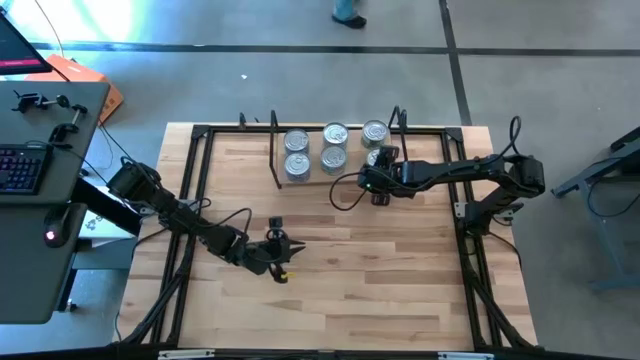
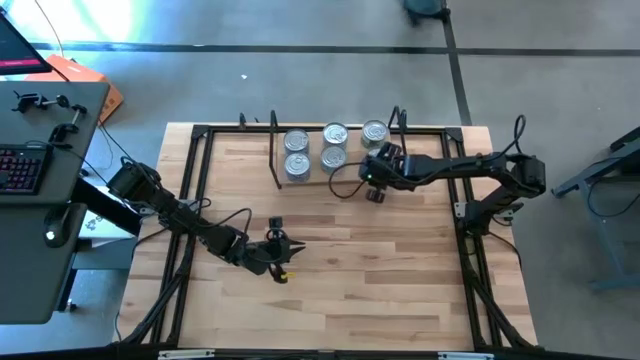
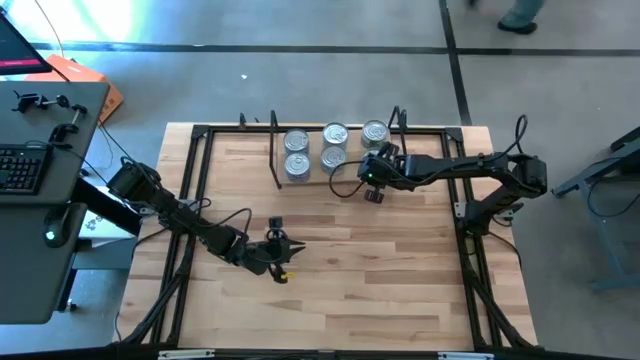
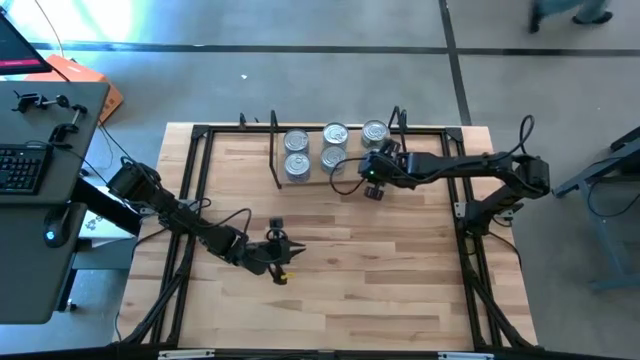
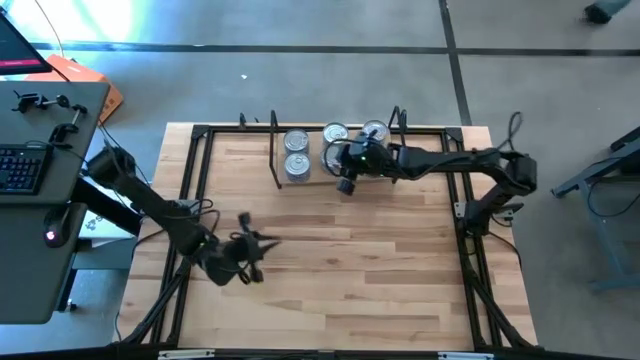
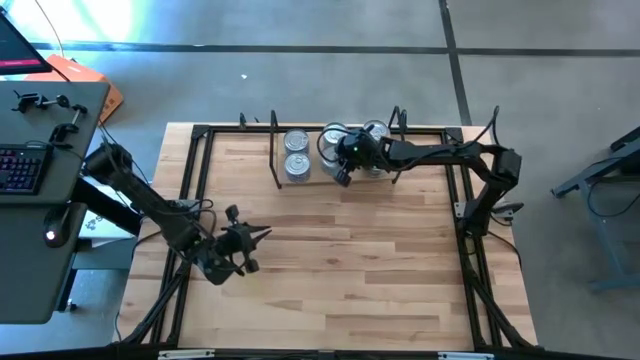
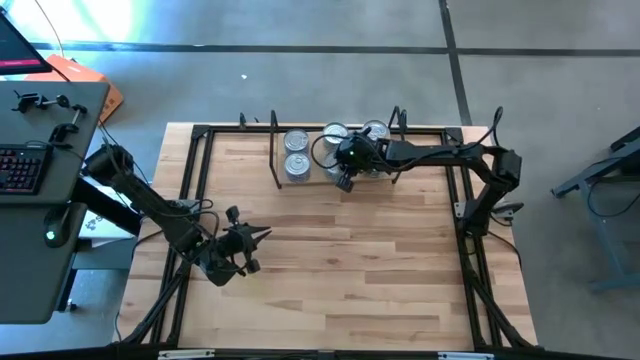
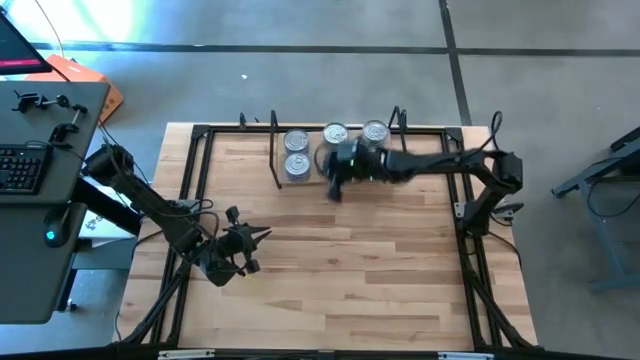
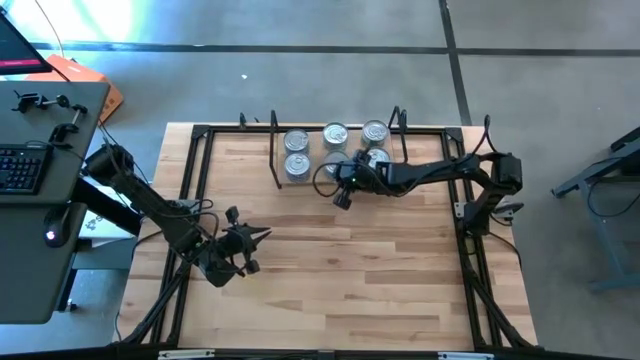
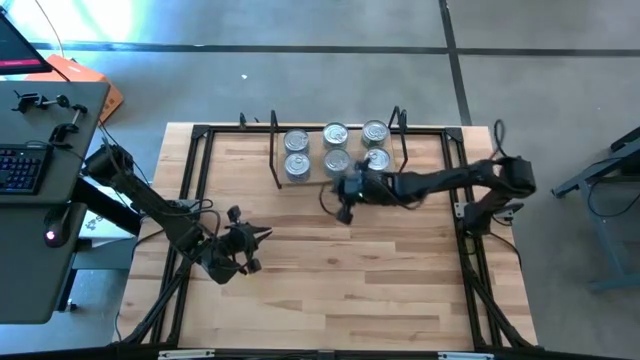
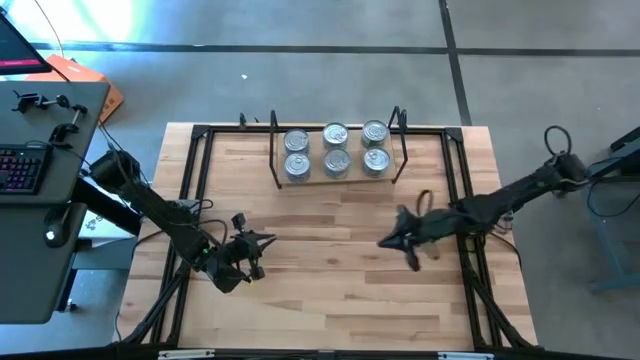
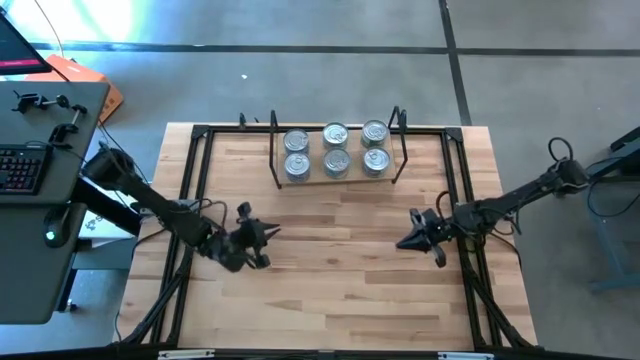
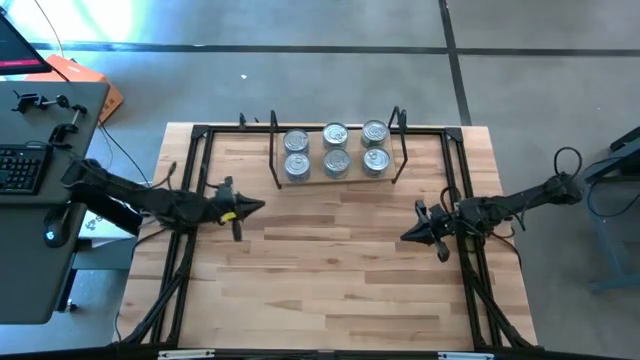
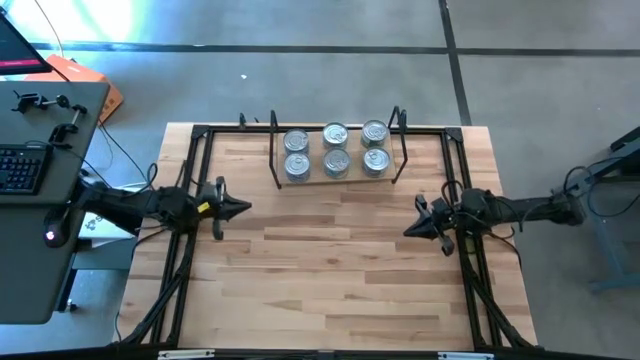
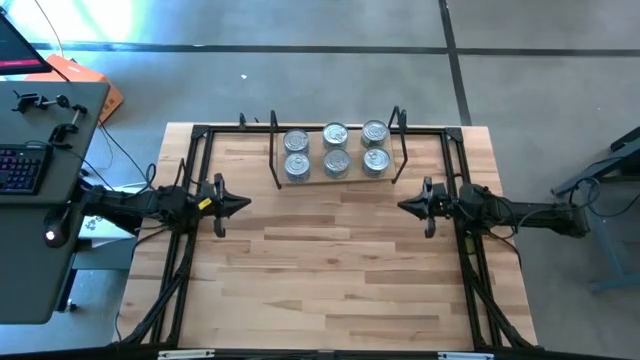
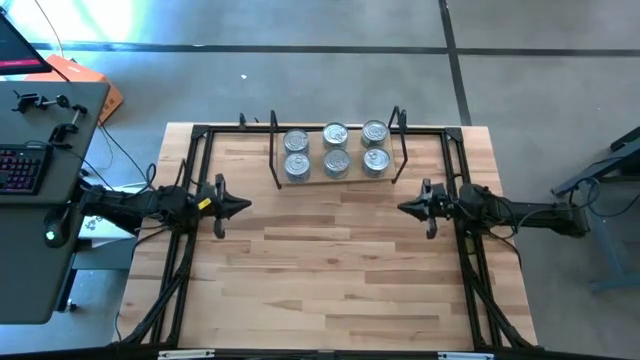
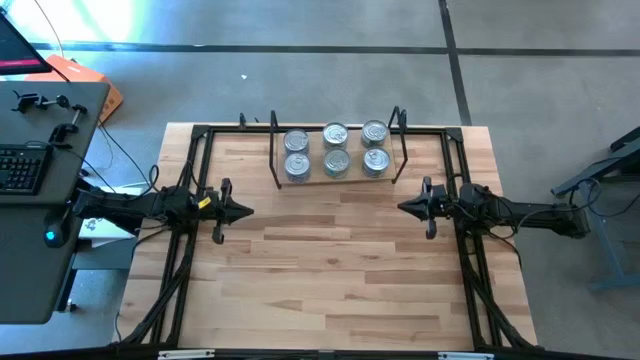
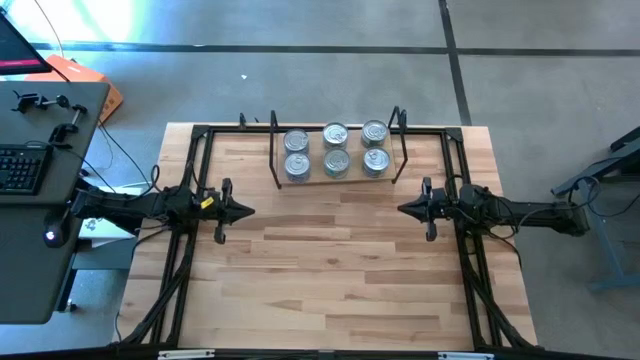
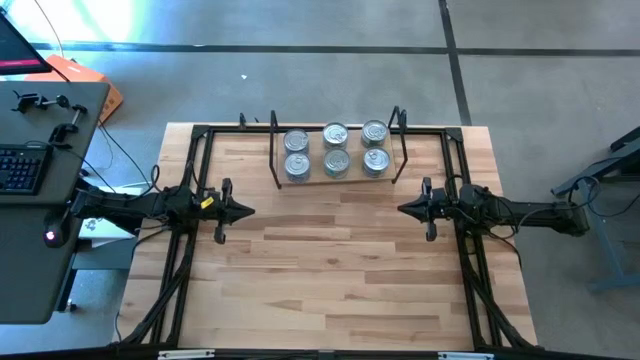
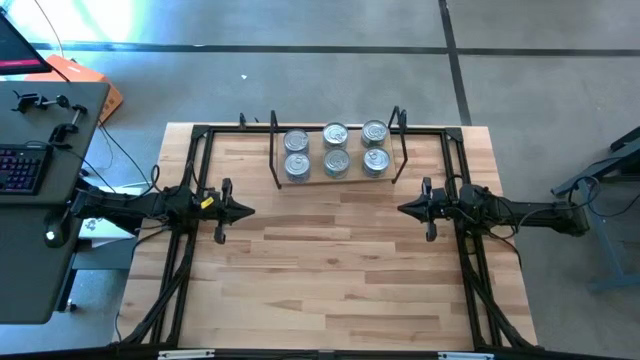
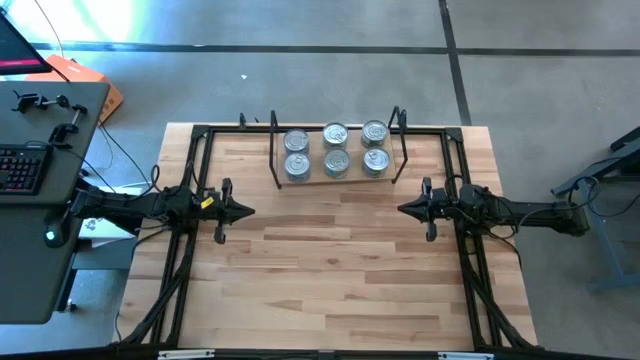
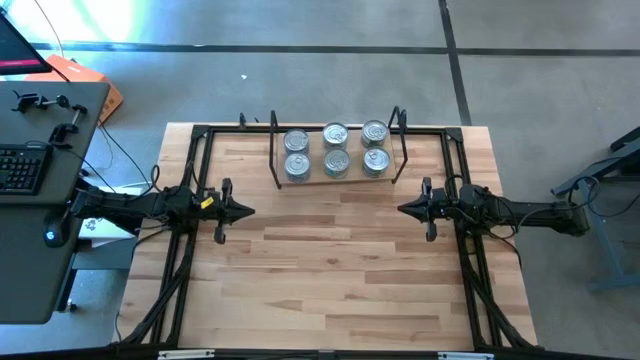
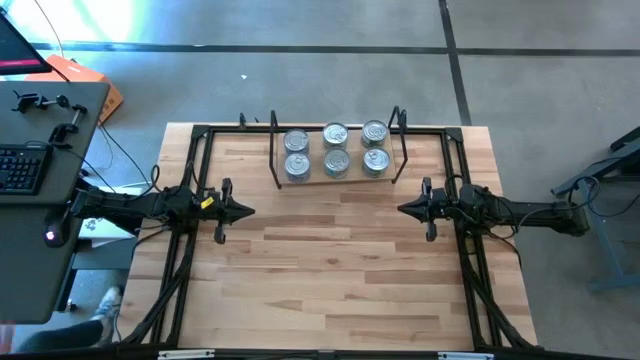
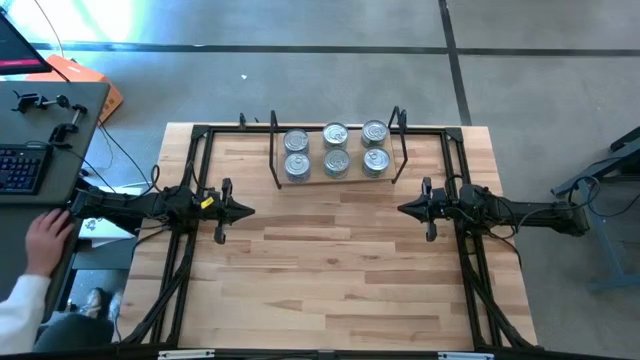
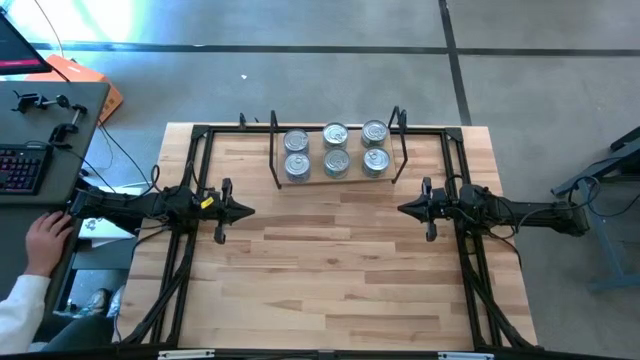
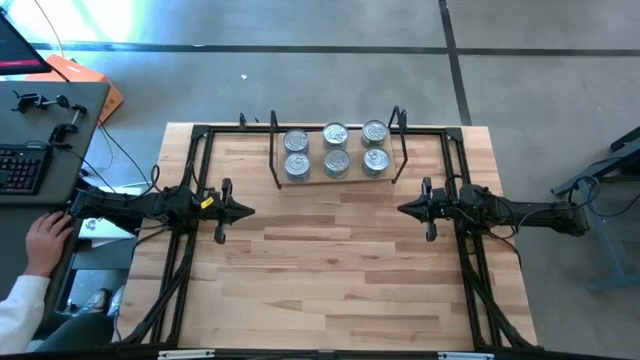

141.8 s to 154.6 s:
Task: Stack canned seafood by type on shelf
Return to Home Position

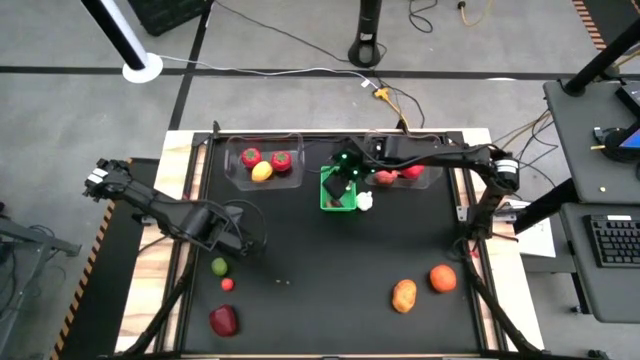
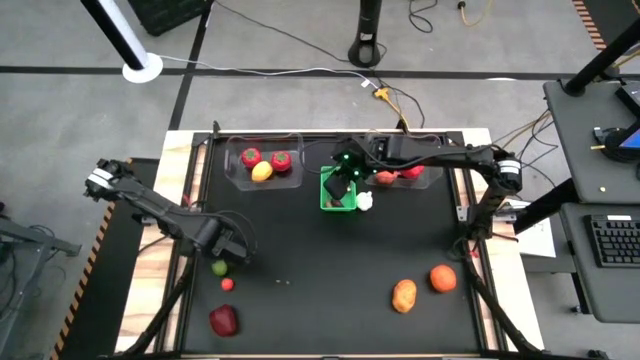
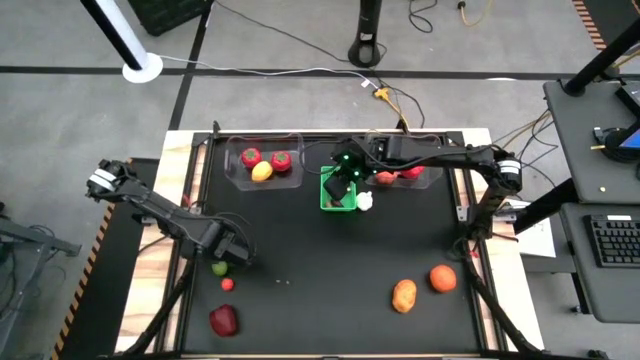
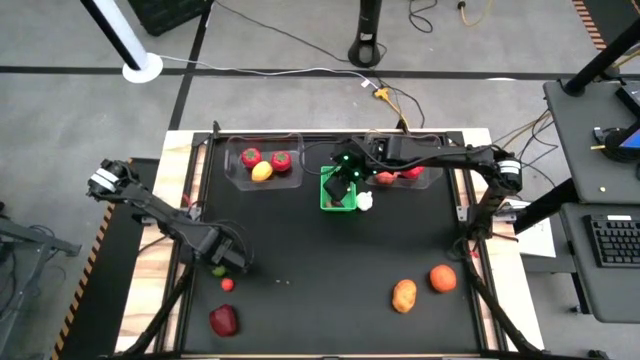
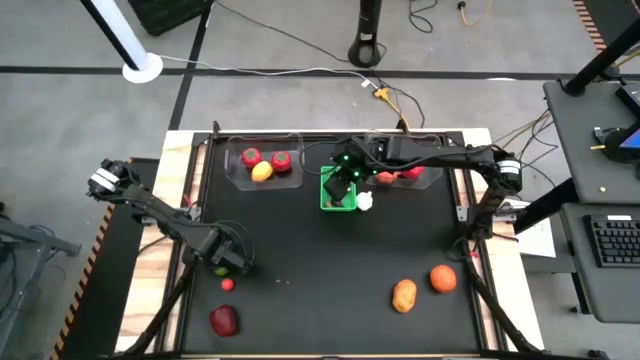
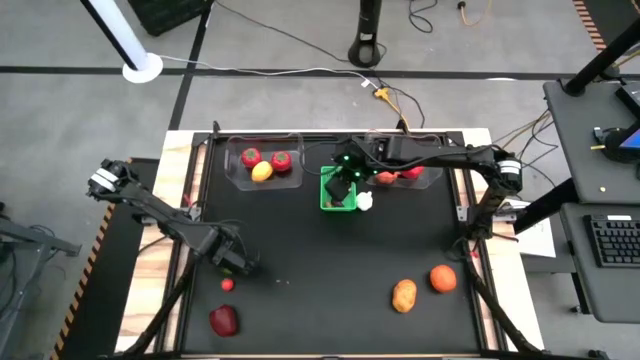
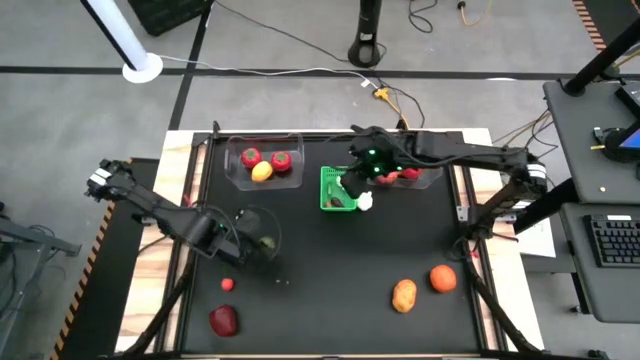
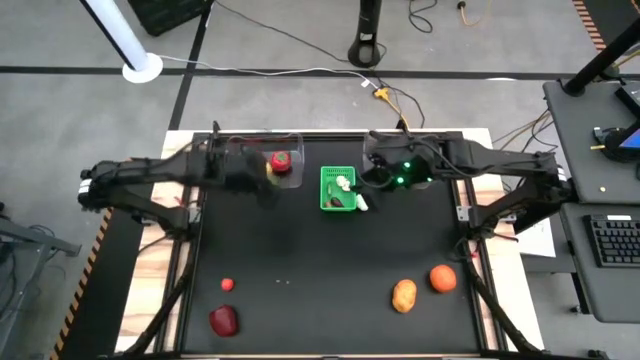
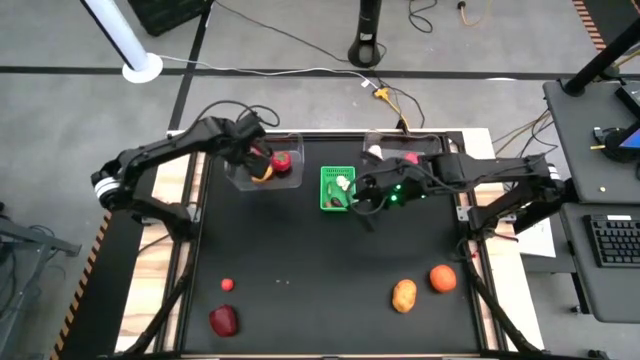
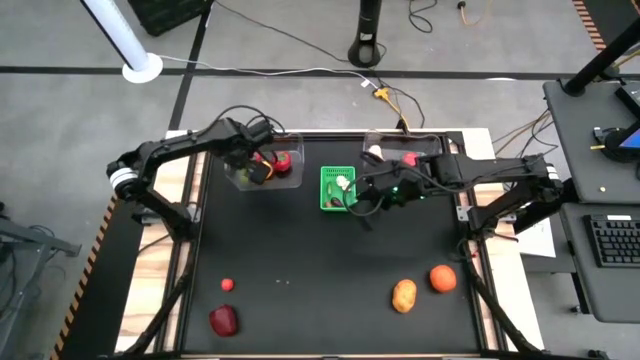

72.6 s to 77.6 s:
Task: Sort produce into baskets
Put the green lemon into the left transparent bin

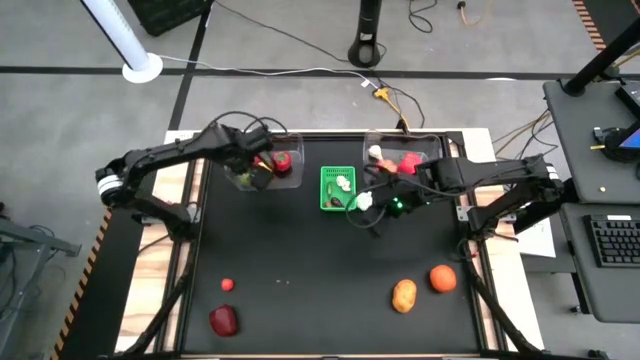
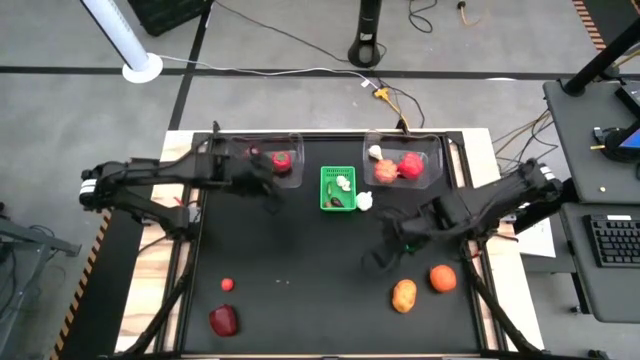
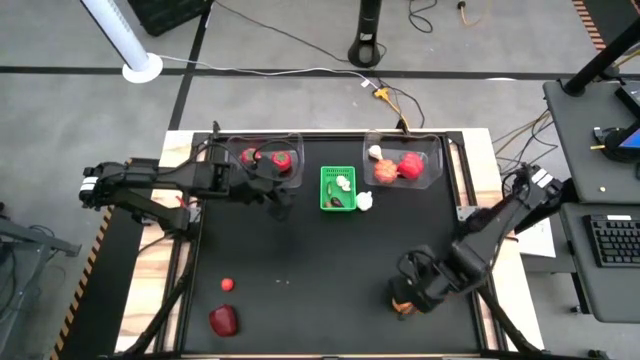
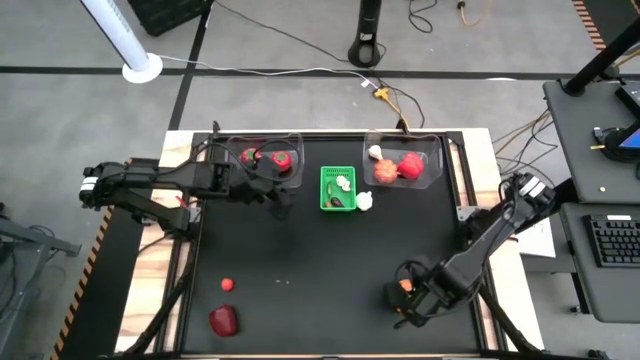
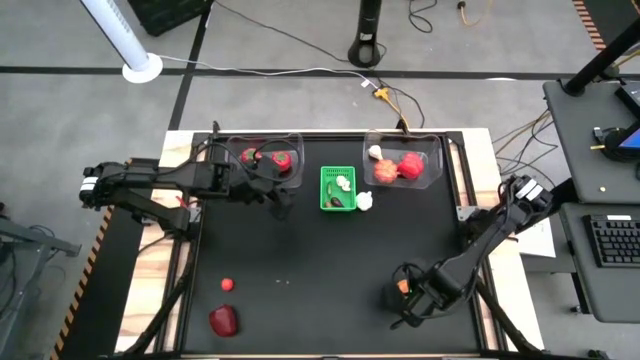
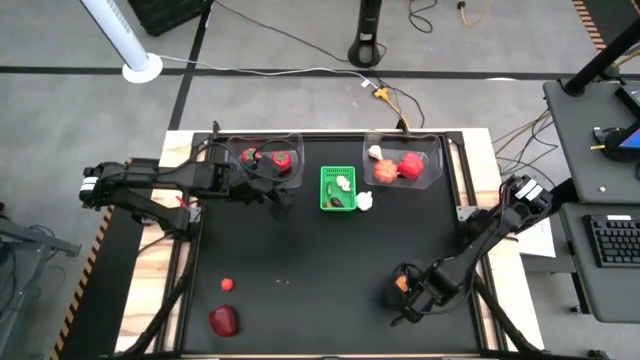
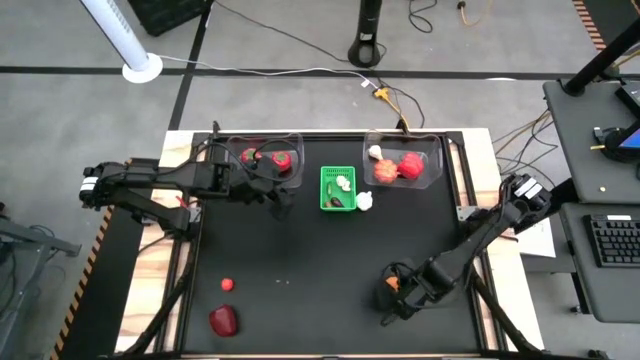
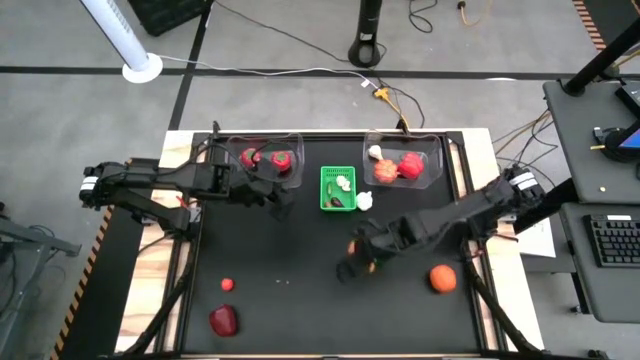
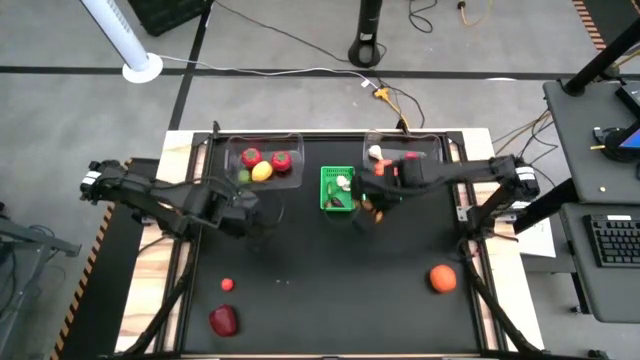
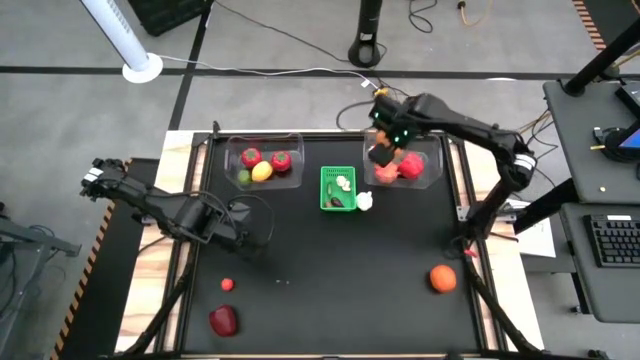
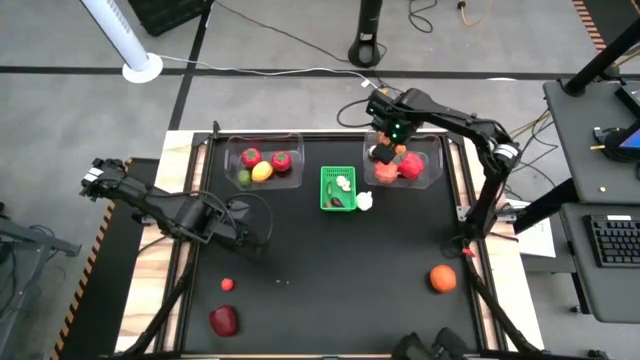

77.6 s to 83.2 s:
Put the big potato into the right transparent bin
